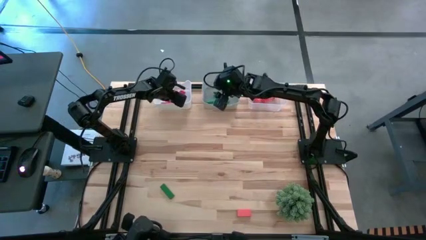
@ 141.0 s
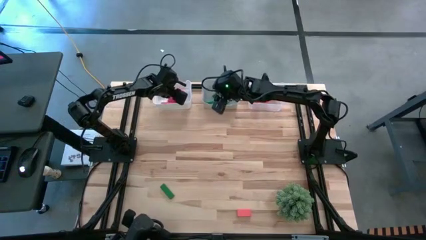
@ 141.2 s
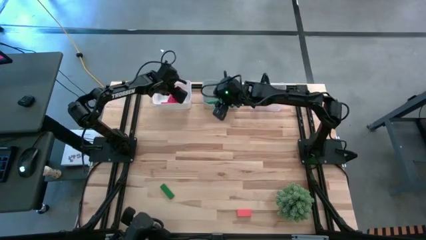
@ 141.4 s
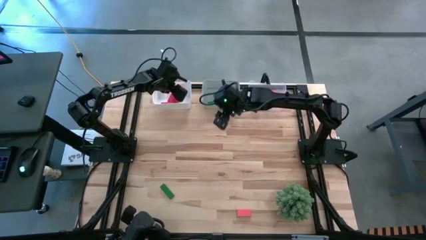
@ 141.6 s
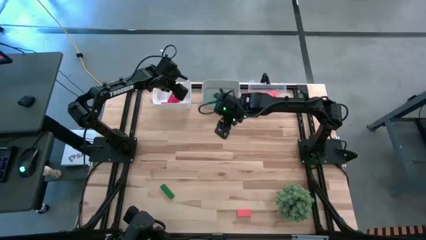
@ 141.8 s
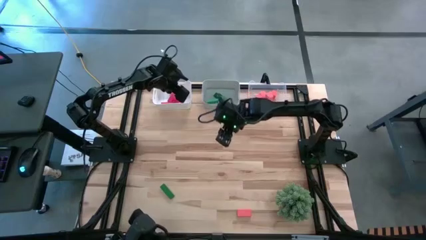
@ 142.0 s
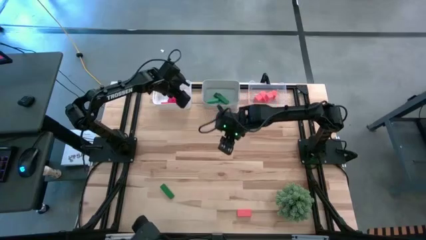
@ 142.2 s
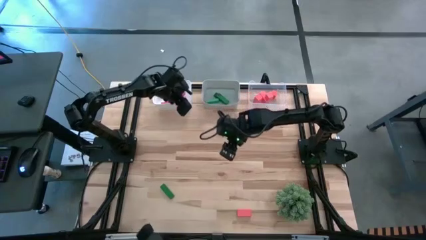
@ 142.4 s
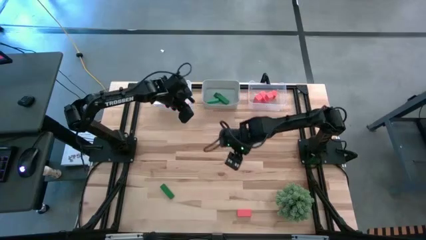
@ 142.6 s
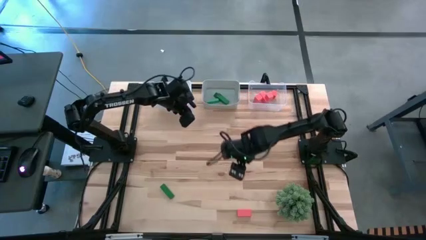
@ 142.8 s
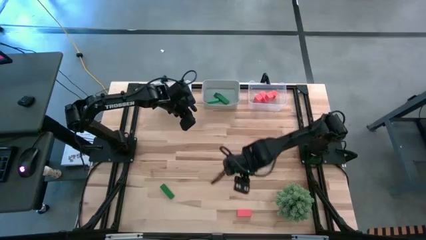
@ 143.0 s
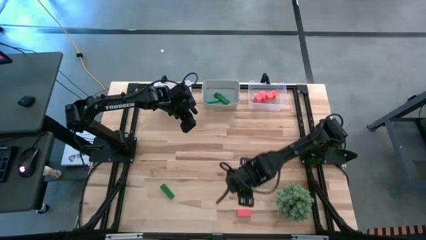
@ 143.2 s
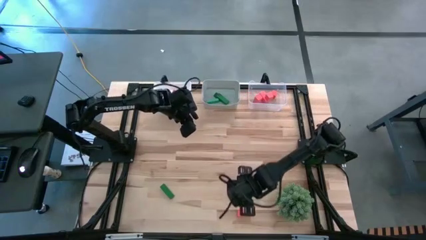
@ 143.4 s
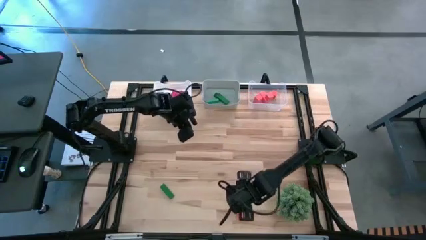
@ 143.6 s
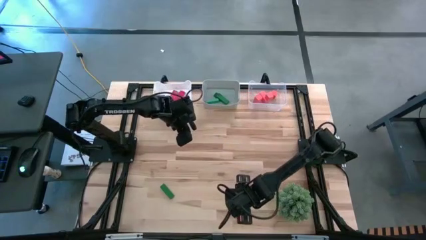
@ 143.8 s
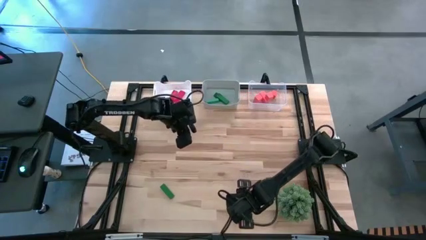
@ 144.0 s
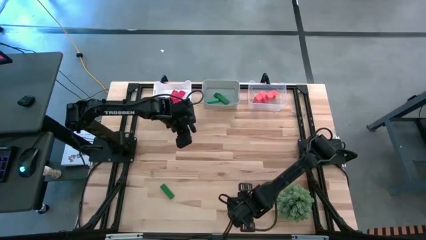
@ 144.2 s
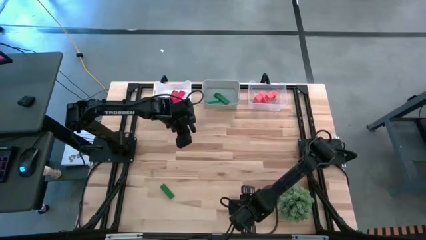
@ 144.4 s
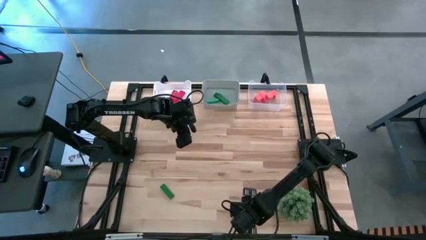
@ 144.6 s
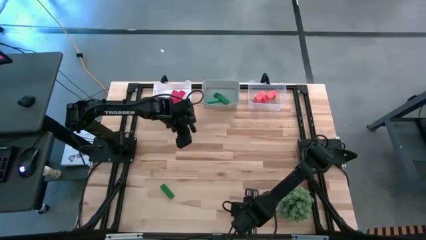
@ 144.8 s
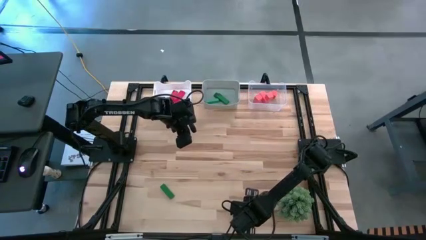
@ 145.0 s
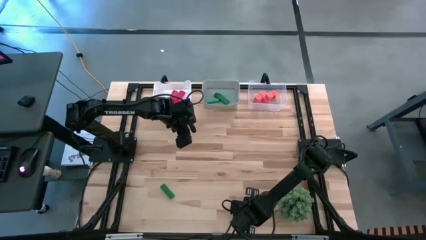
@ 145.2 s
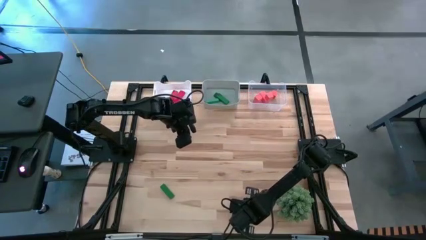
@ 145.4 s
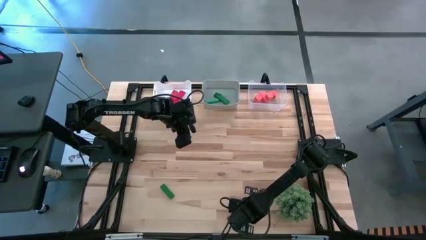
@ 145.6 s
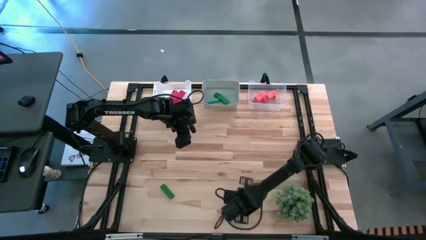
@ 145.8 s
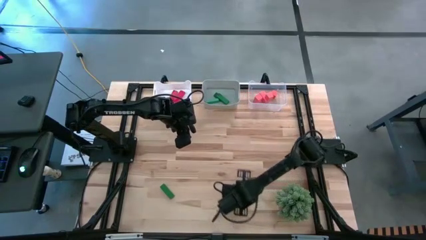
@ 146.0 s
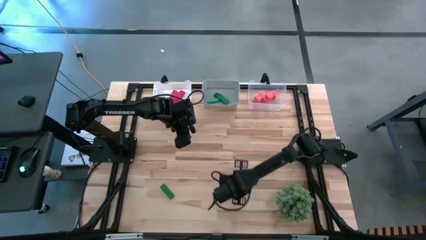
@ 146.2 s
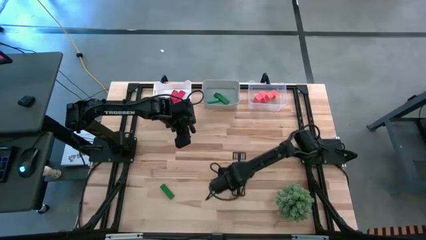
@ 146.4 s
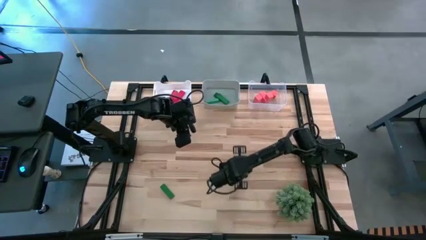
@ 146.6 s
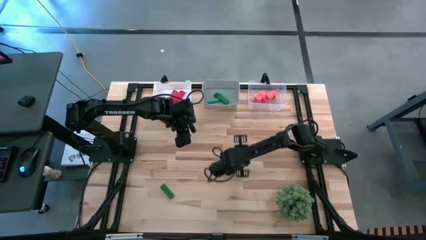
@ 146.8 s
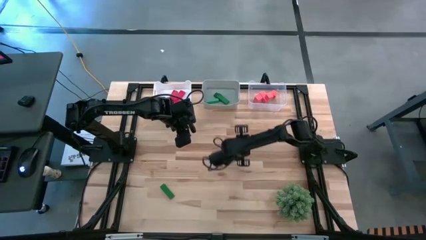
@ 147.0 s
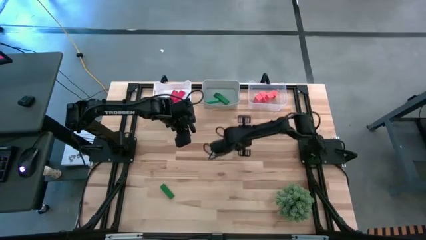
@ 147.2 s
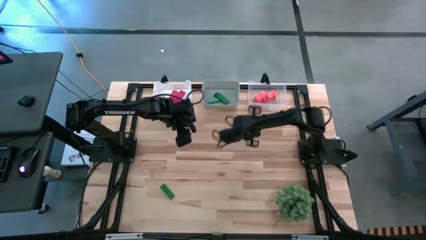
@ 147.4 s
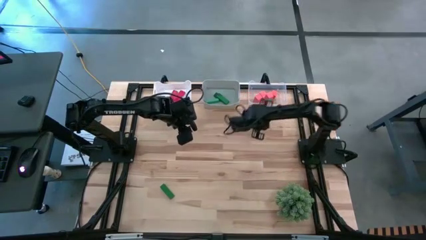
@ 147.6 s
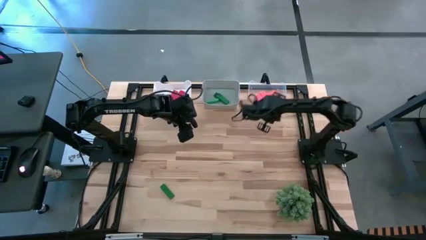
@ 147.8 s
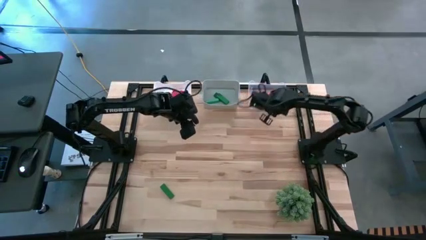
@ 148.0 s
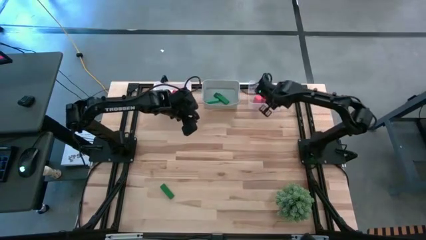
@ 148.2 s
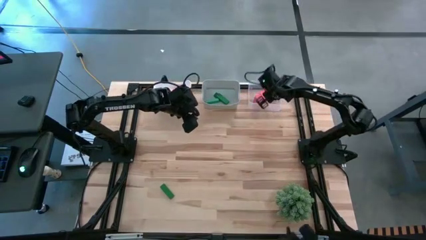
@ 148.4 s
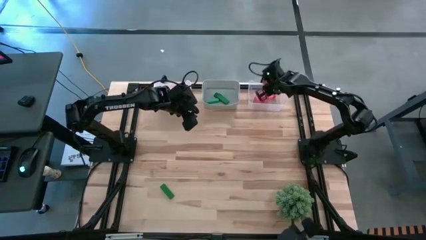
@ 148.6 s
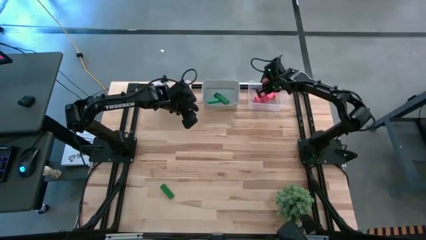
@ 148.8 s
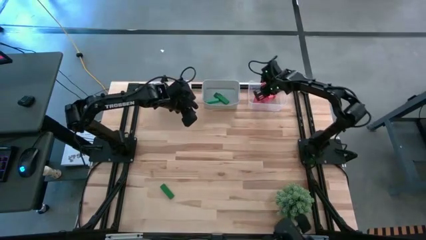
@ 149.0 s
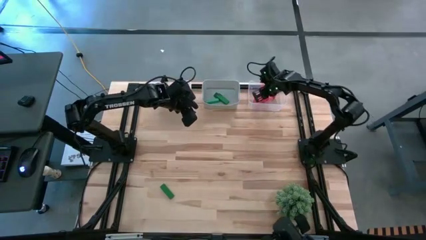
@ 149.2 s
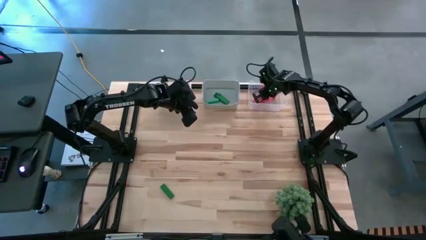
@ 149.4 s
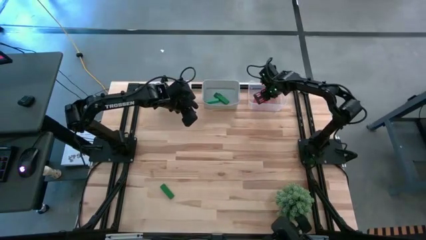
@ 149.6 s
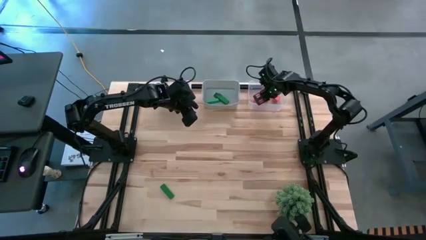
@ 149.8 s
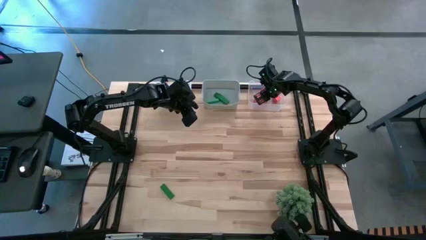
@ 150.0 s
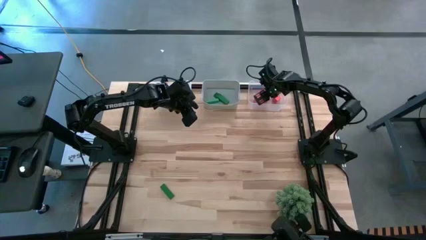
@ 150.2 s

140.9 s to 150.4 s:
Task: Sort & place blocks by color
Put the orange block into the transparent bin

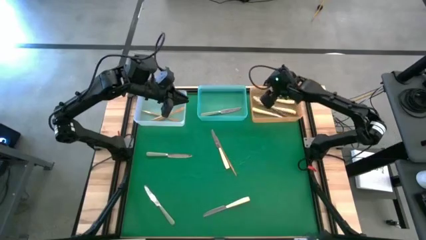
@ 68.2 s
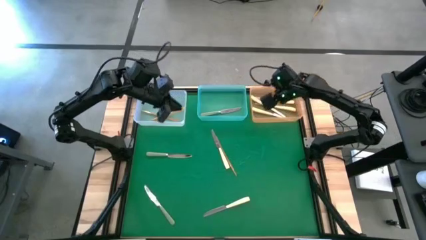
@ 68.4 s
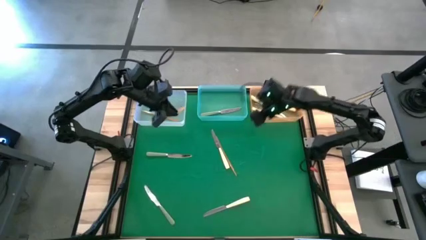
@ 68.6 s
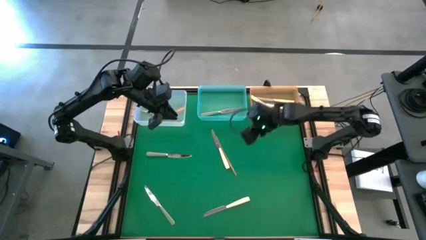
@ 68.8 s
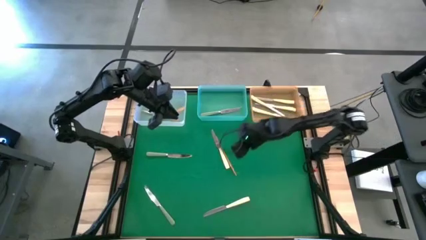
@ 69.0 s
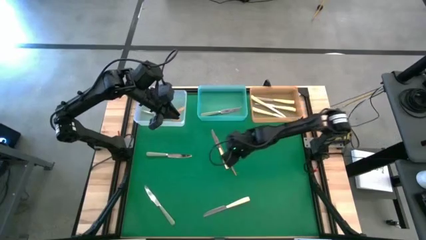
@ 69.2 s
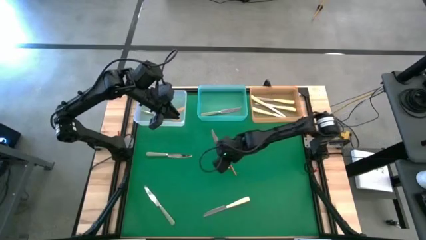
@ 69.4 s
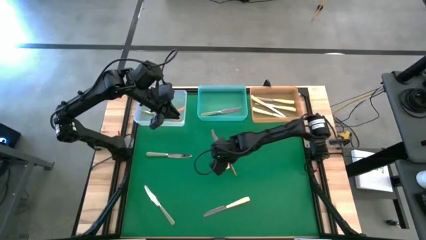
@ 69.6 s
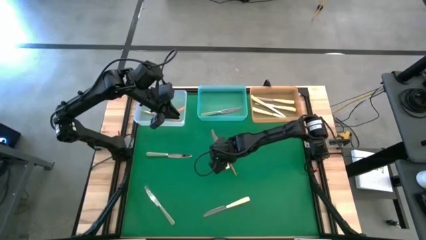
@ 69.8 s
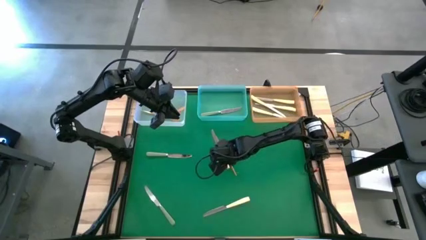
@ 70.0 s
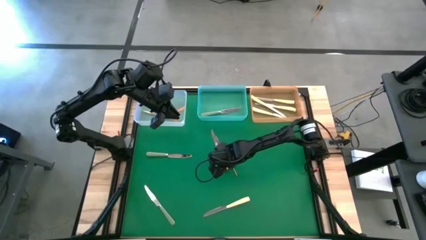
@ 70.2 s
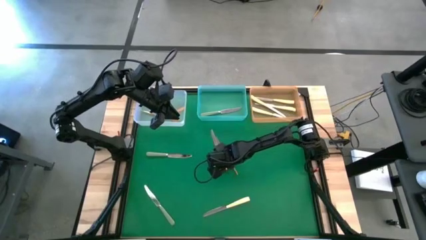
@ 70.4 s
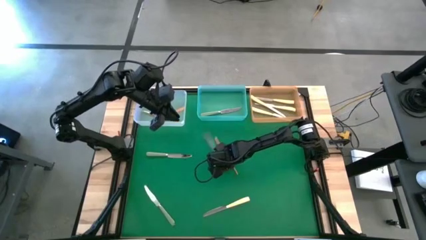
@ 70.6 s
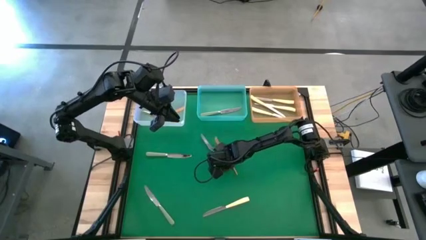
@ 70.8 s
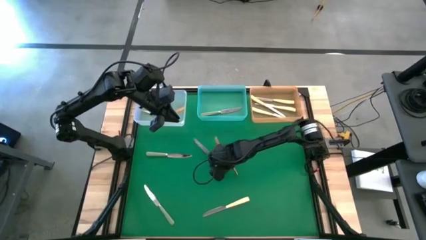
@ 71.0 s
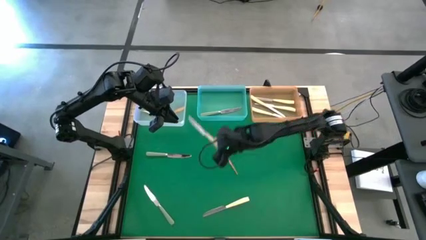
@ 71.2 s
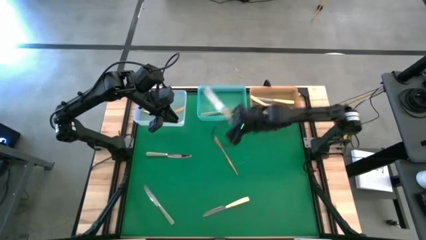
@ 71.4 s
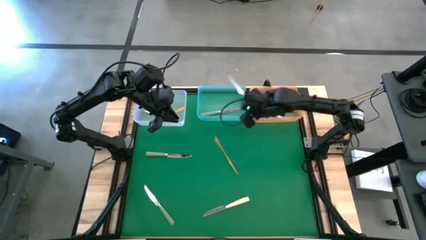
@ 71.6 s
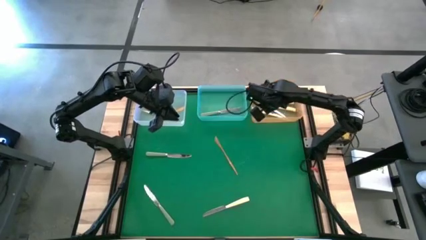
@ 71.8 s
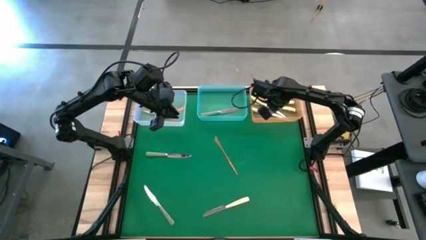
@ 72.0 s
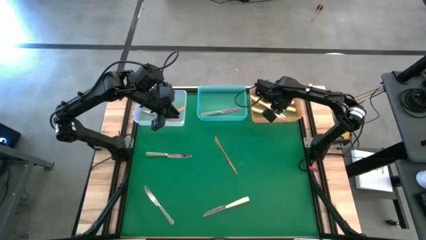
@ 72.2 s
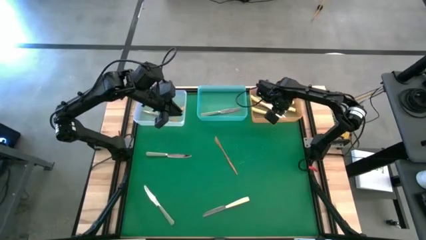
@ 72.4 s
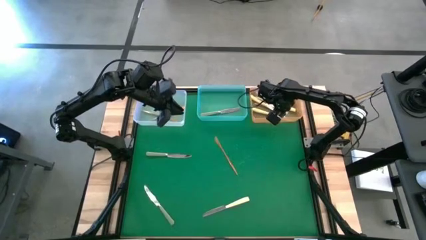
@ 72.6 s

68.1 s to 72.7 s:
Task: Sort silverware by color (type)
Put the yellow table knife into the orange bin
